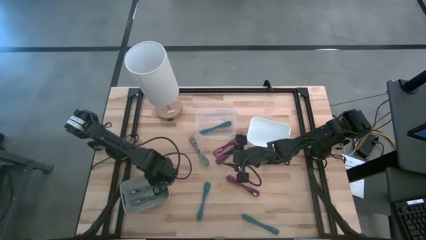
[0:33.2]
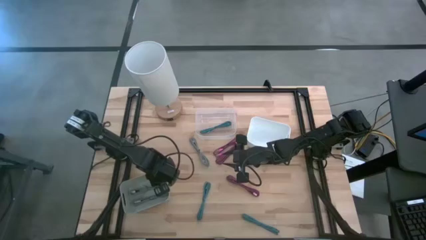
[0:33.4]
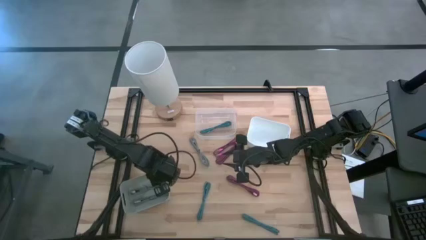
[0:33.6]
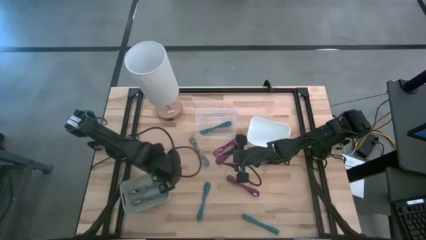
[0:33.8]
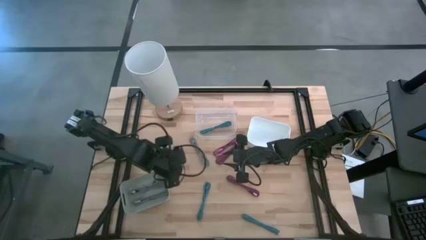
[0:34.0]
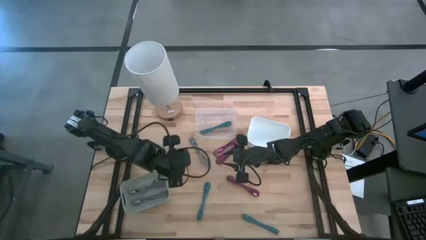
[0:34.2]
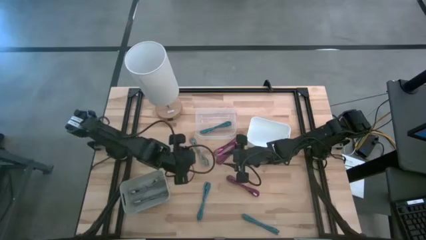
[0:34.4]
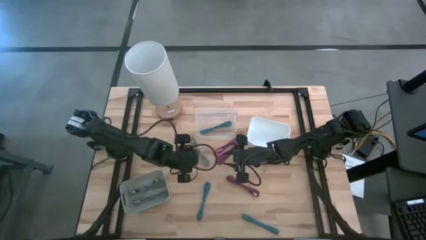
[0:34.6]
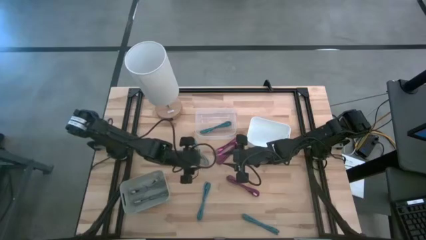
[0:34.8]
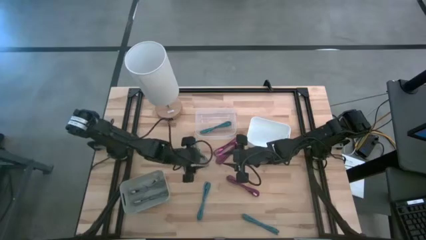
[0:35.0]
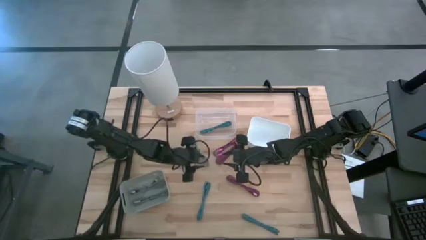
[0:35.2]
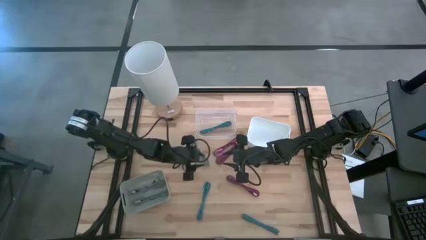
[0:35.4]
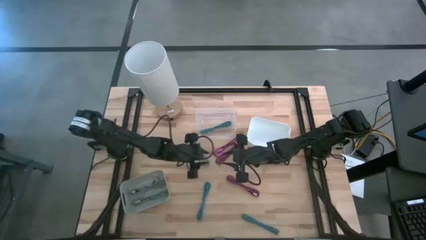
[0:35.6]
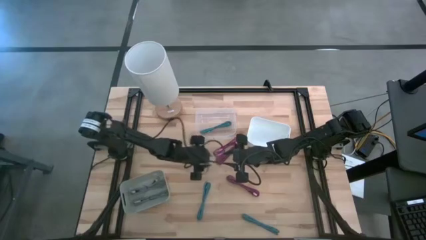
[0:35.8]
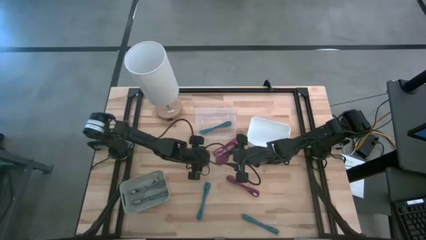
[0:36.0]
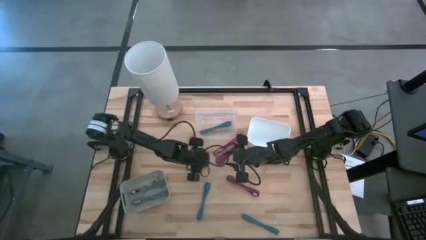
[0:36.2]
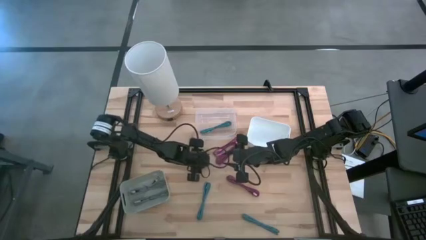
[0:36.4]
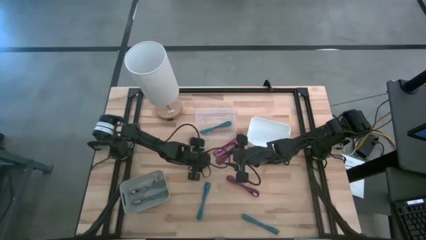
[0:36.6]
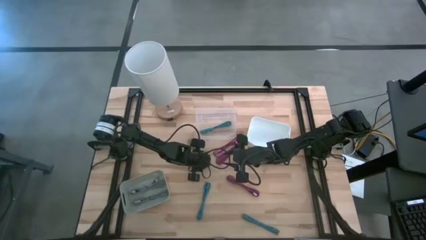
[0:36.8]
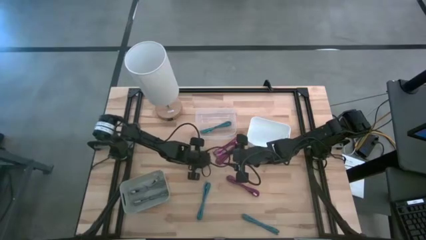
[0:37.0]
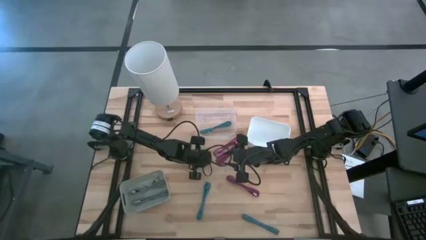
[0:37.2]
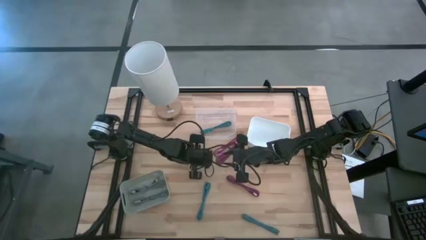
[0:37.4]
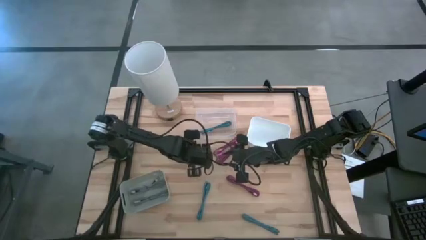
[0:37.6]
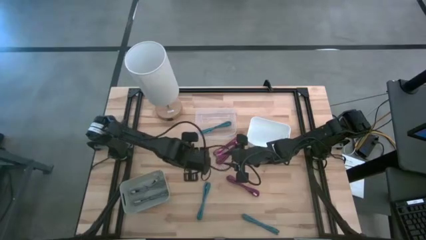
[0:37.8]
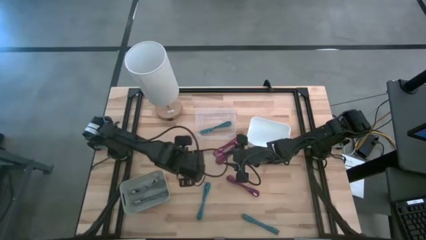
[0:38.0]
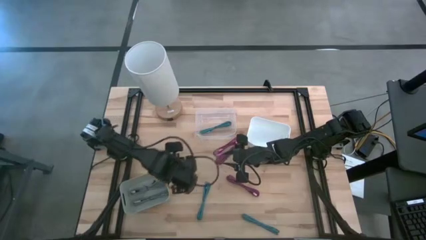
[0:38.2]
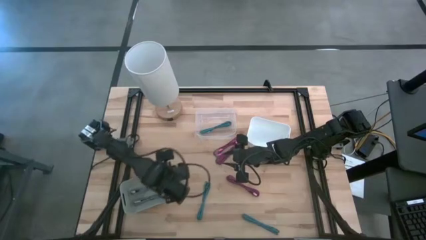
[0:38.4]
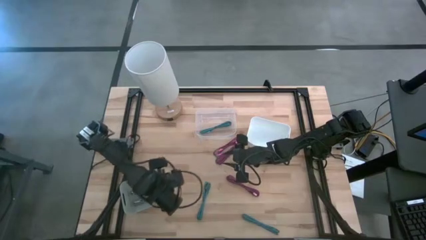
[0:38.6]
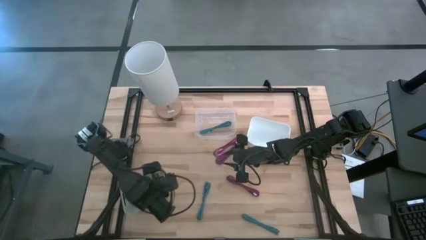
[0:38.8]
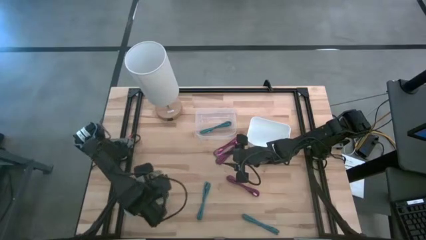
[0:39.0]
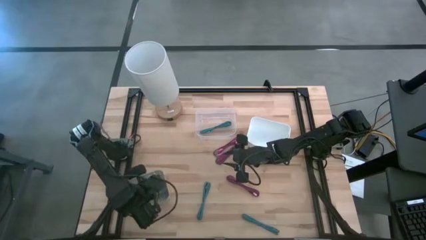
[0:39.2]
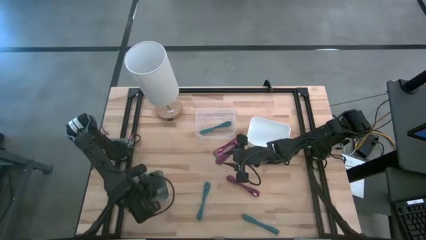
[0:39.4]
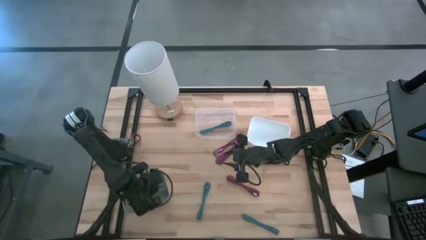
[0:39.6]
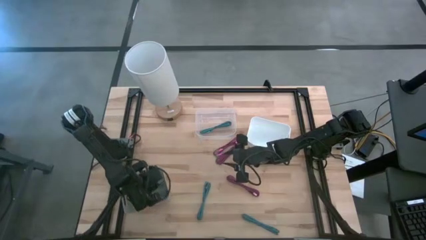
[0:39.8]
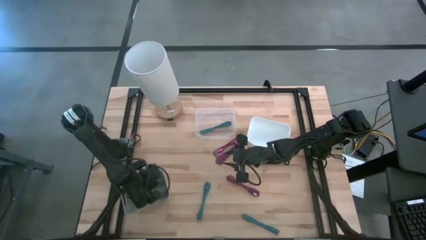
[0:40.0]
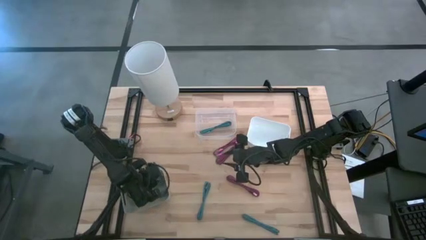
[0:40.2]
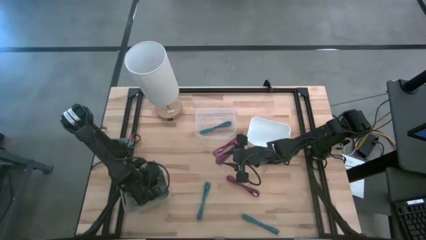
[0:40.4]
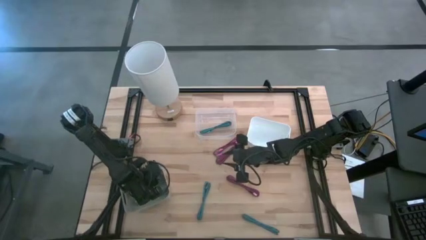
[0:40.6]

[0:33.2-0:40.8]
Task: Pick & Place USB Port
Put the white USB cable into the gray bin

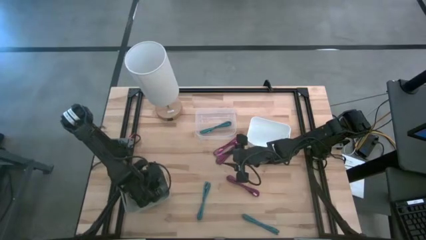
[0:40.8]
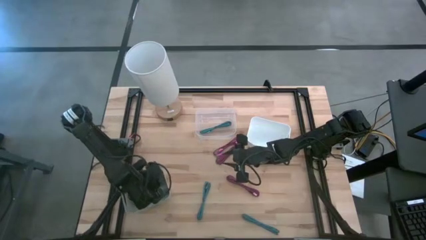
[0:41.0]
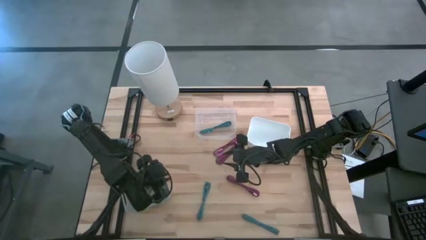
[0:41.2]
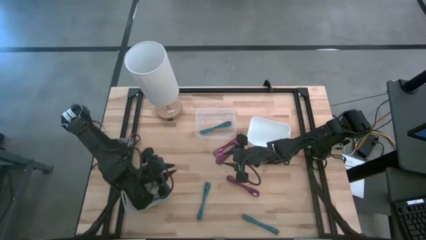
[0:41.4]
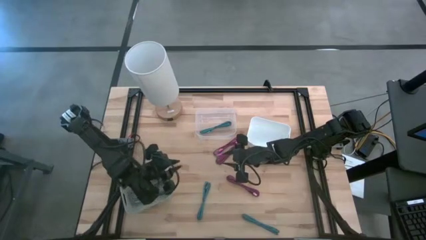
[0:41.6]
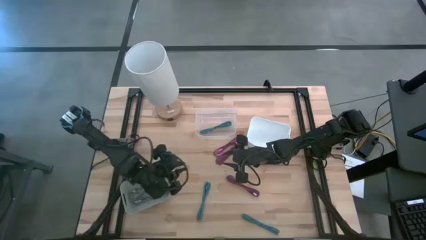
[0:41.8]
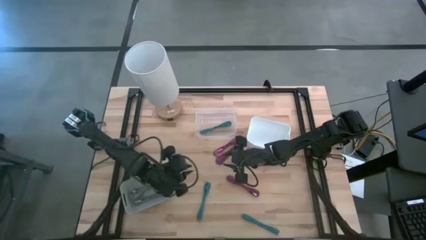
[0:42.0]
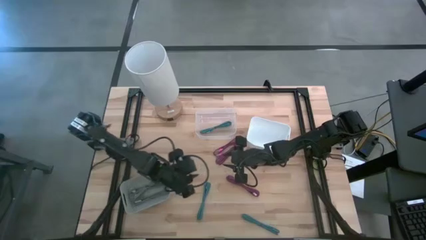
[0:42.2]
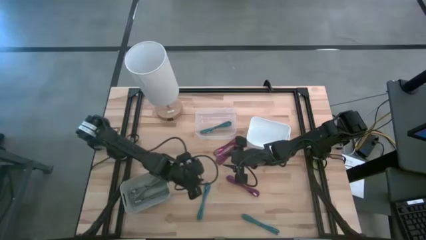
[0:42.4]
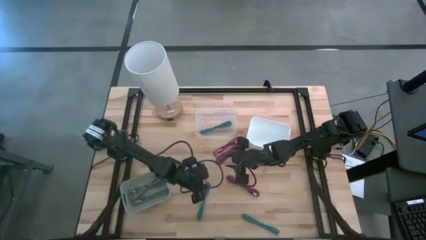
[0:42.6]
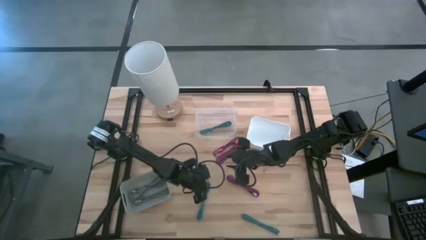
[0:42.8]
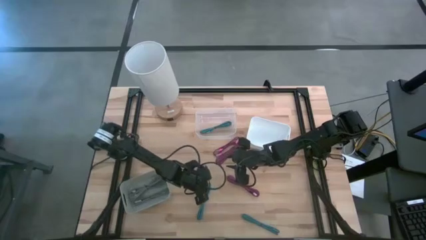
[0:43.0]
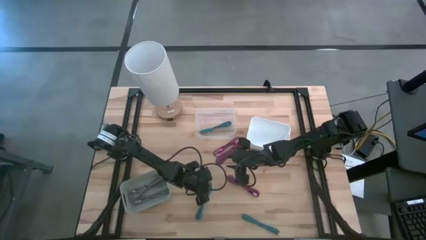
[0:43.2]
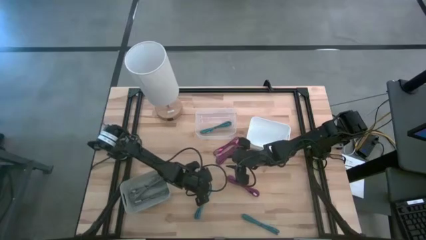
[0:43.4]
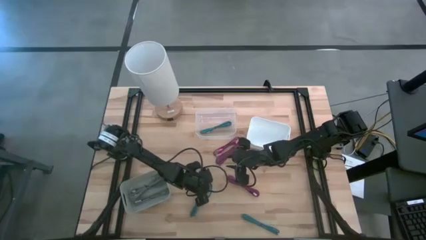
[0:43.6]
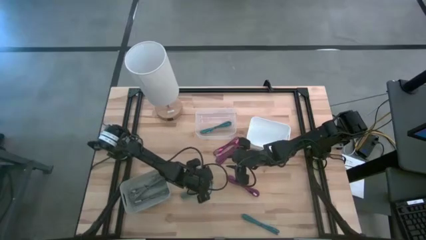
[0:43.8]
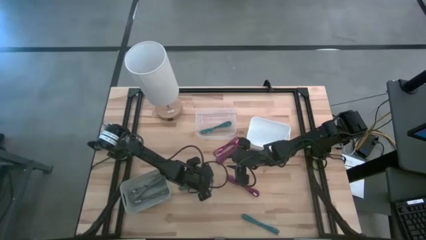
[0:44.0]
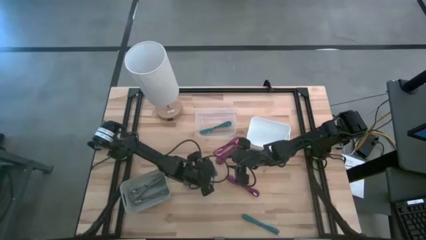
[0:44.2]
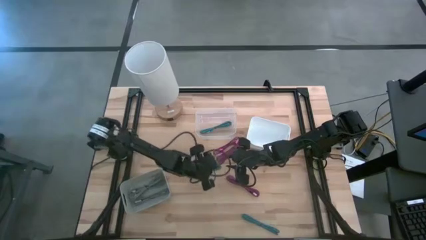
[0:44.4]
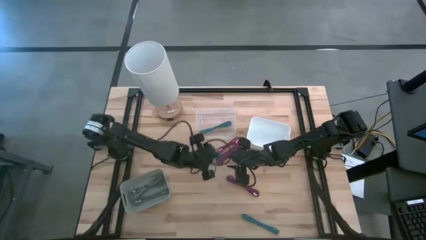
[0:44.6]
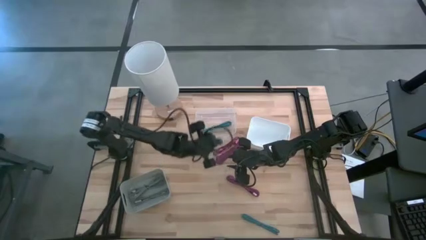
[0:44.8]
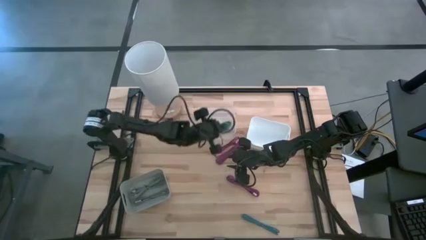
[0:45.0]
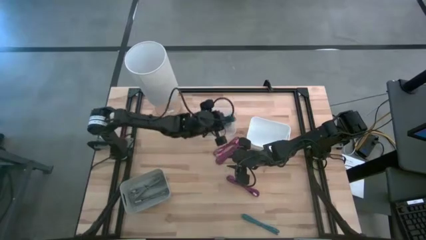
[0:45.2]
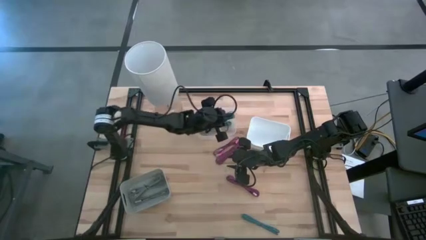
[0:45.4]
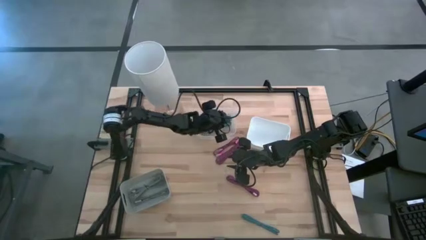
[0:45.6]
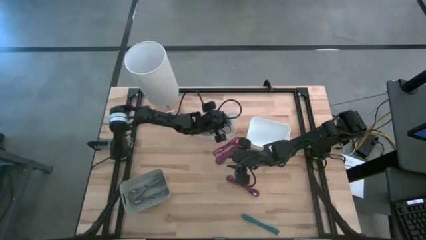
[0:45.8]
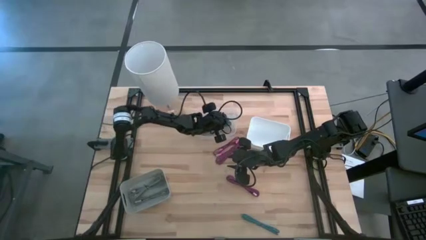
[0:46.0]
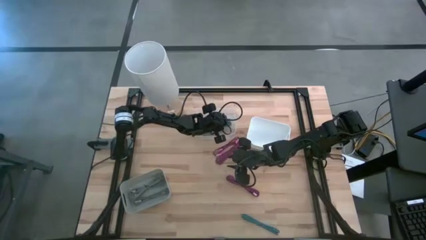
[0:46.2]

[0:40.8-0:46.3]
Put the left blue USB cable into the transparent bin

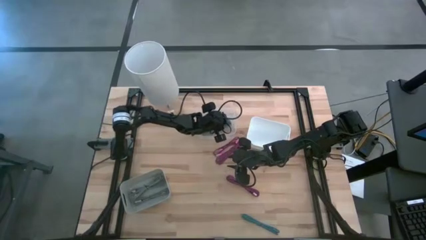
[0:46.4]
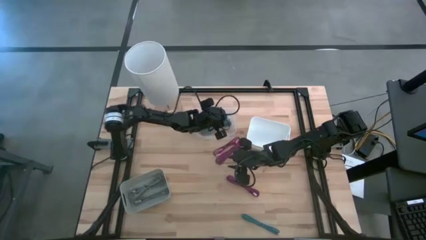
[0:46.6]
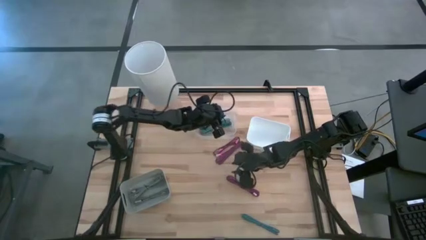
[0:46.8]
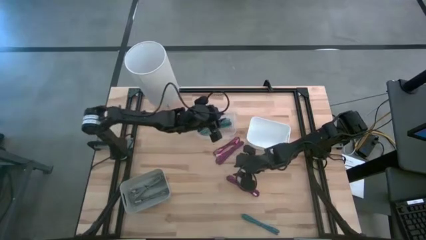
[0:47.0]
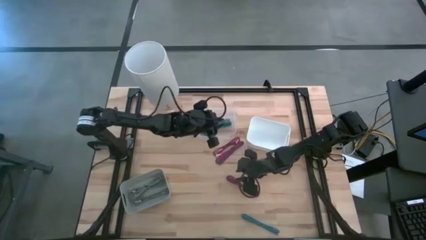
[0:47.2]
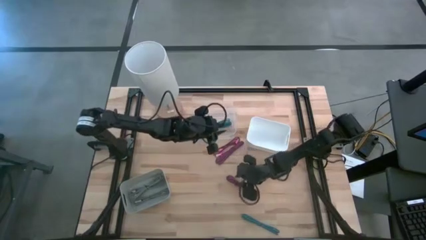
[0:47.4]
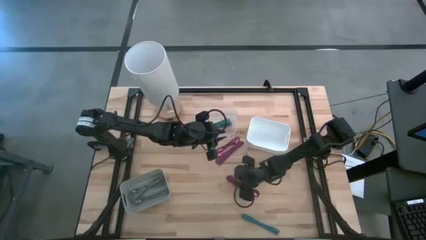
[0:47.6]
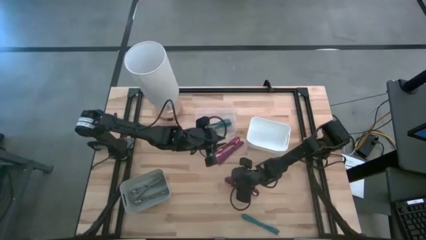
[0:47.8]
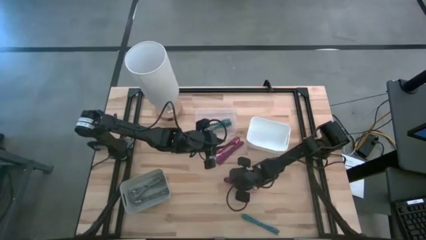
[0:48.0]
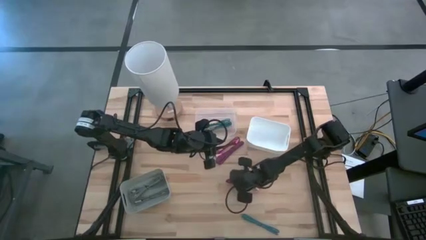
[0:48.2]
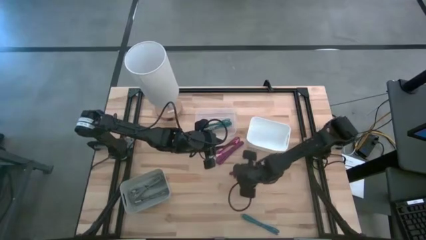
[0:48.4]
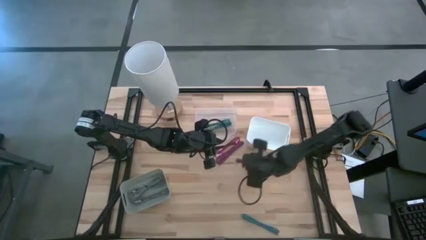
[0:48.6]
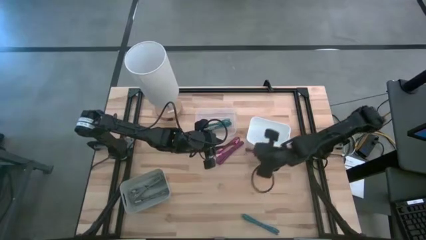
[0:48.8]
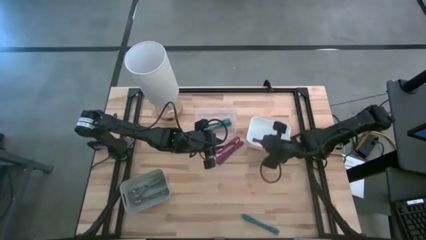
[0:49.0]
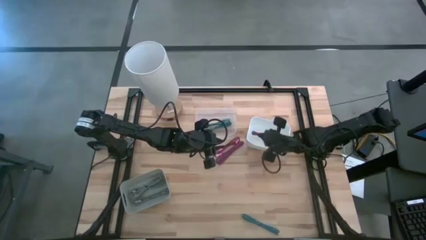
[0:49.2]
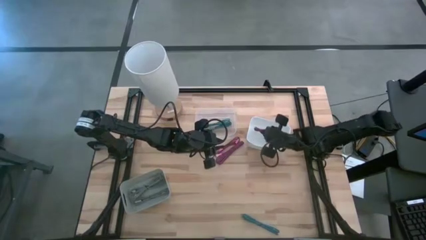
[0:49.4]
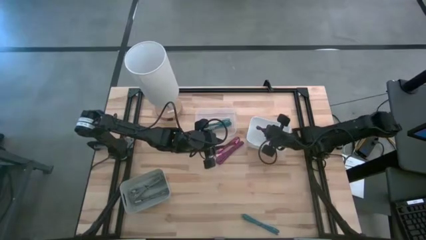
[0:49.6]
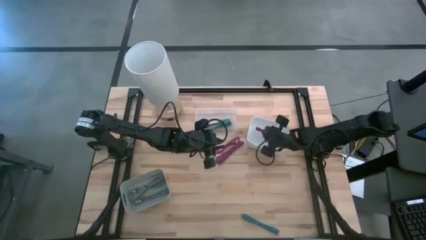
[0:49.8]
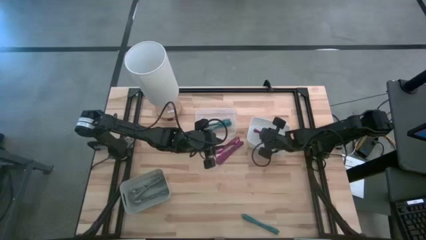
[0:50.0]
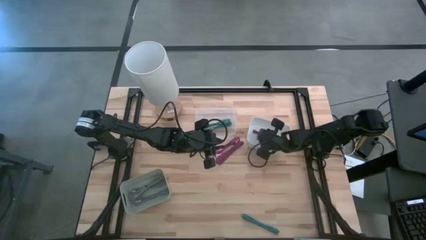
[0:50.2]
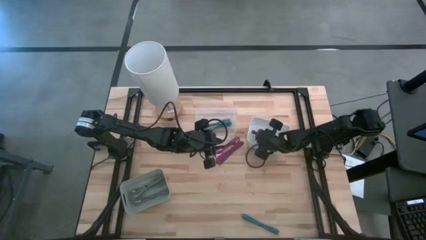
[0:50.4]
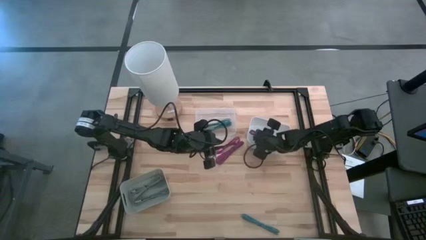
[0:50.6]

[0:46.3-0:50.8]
Put the bottom pink USB cable into the white bin
